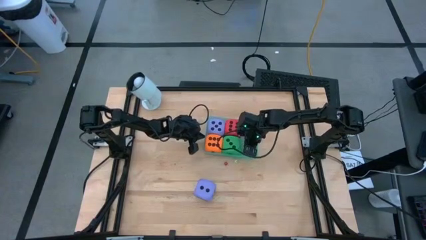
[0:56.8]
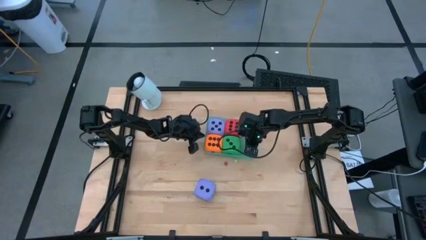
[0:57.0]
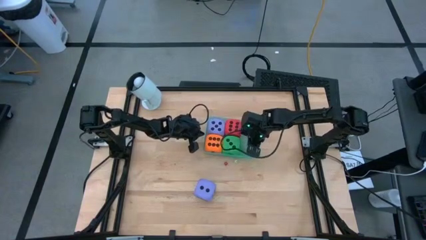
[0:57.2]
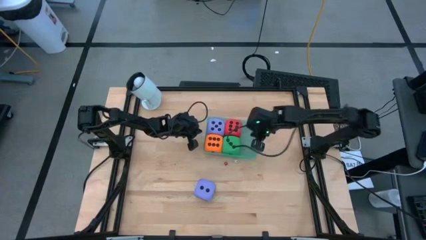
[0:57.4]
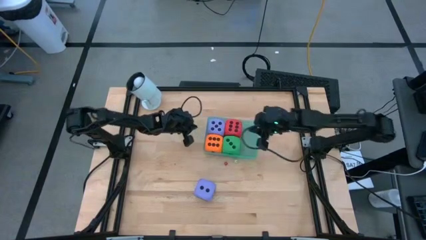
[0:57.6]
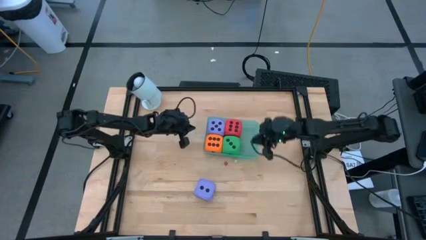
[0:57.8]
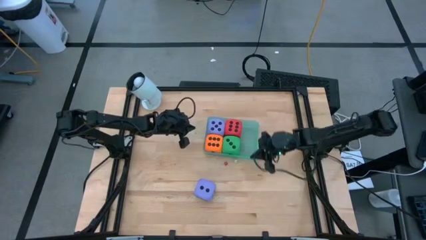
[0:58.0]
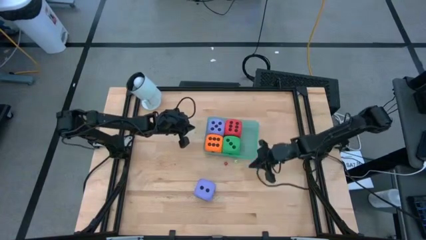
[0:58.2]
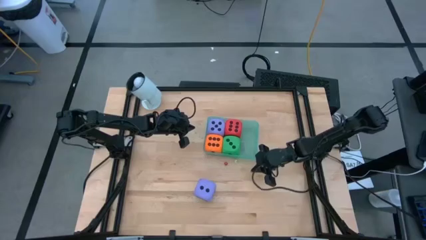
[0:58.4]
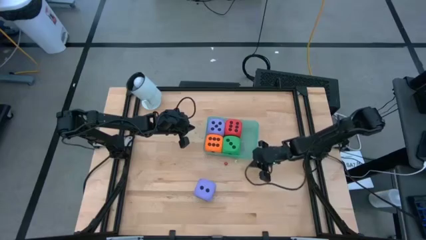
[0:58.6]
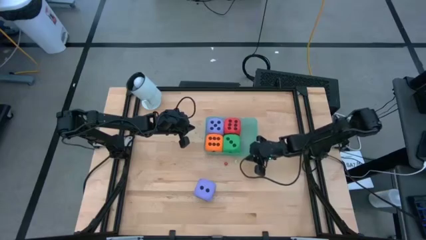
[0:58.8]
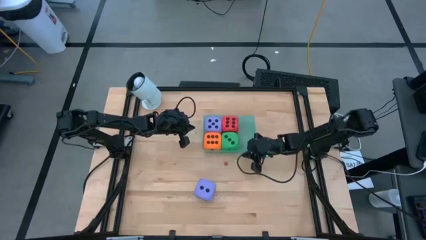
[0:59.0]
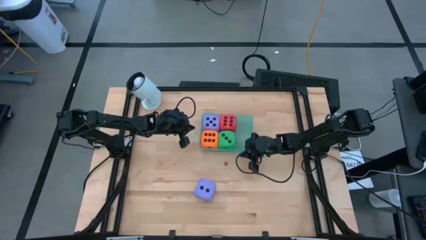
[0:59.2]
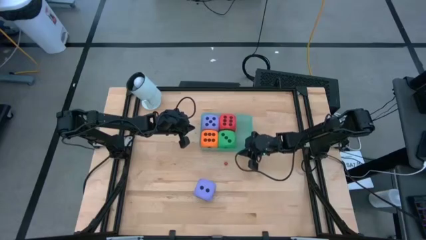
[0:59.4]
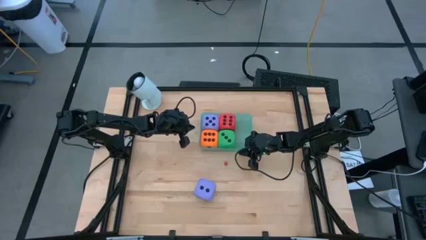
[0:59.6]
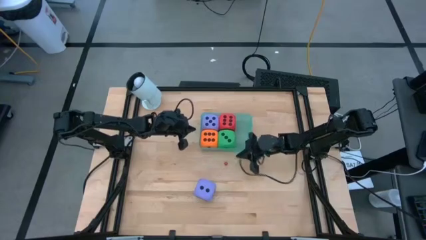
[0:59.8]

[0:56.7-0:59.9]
Task: Pick & Place Dice
Adjust the green bin

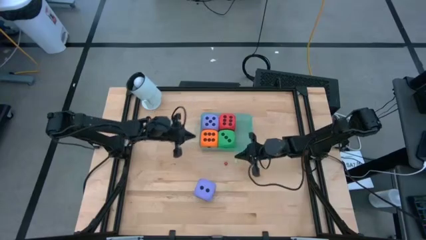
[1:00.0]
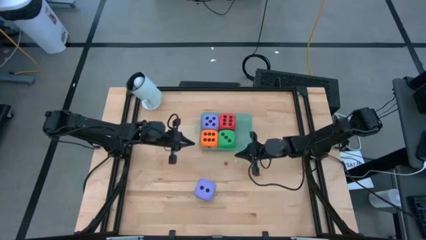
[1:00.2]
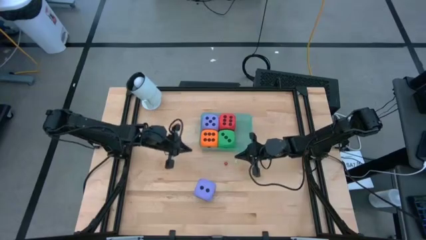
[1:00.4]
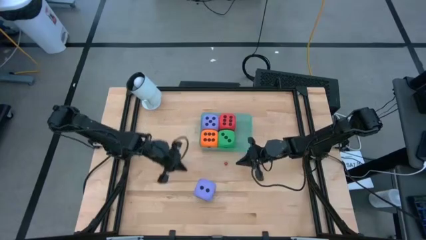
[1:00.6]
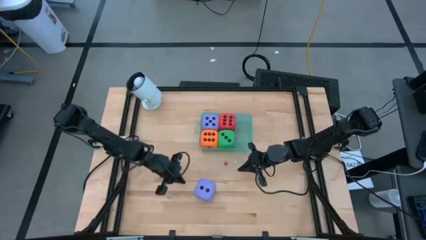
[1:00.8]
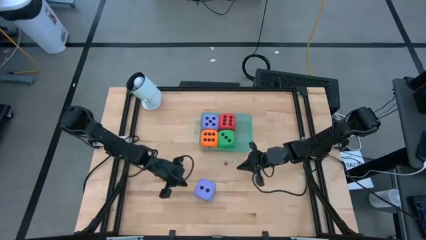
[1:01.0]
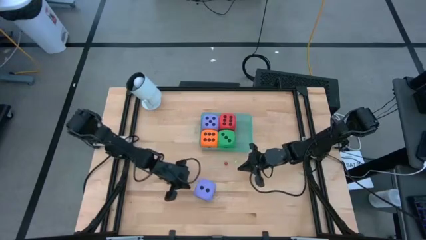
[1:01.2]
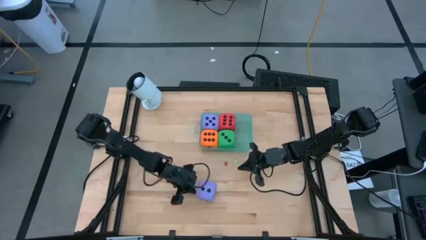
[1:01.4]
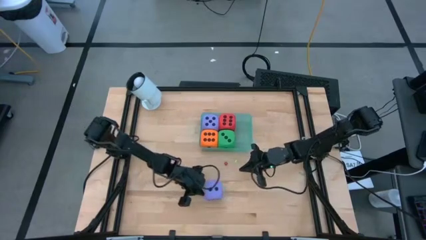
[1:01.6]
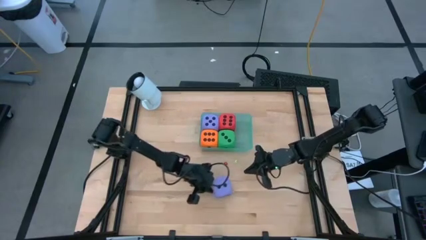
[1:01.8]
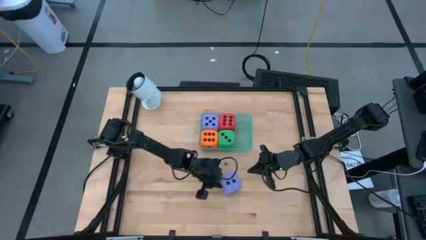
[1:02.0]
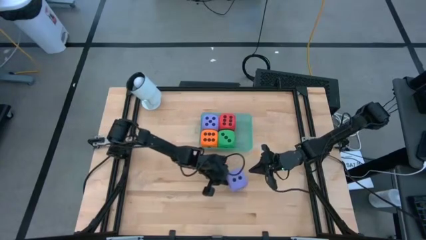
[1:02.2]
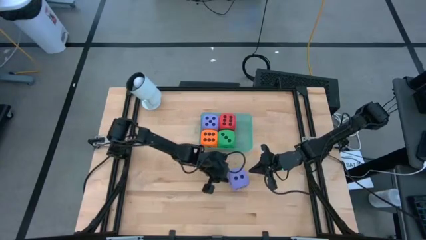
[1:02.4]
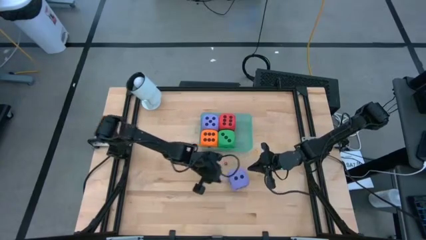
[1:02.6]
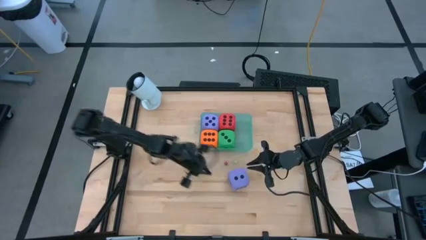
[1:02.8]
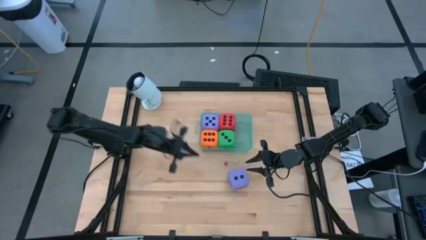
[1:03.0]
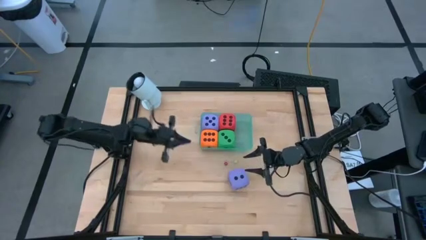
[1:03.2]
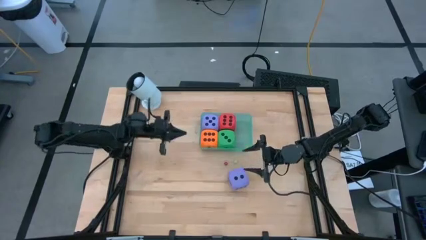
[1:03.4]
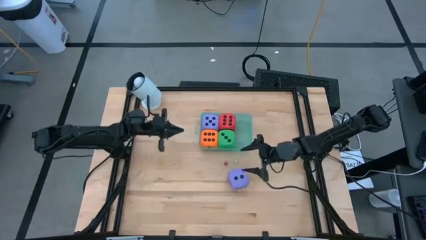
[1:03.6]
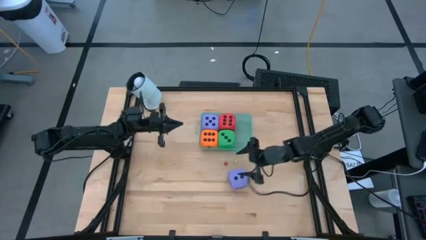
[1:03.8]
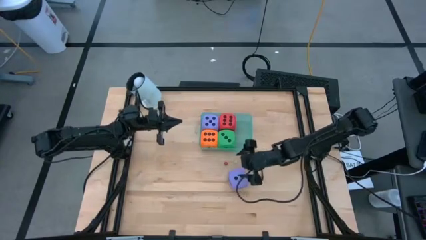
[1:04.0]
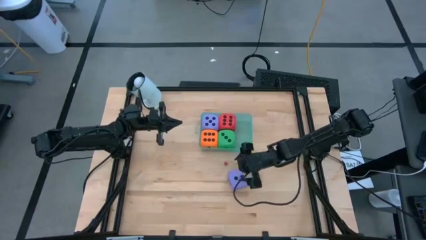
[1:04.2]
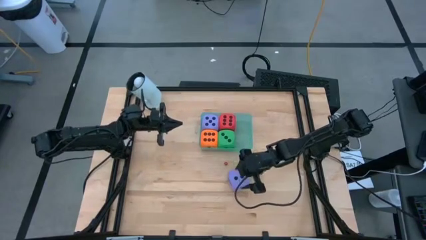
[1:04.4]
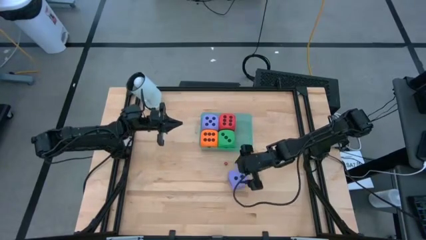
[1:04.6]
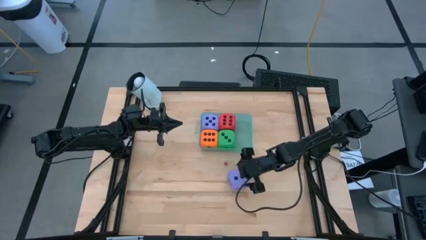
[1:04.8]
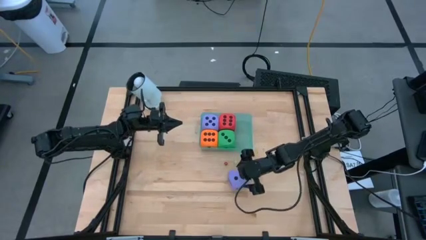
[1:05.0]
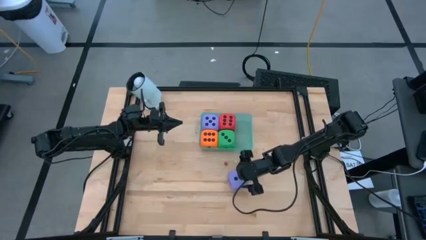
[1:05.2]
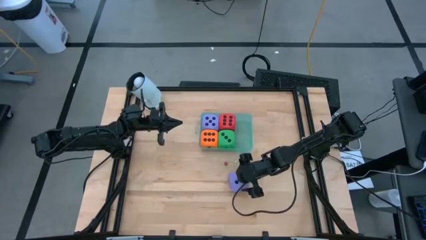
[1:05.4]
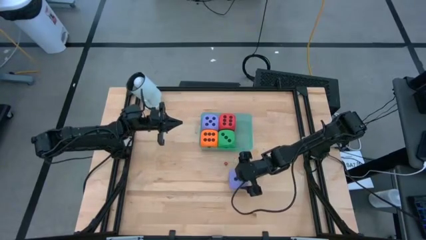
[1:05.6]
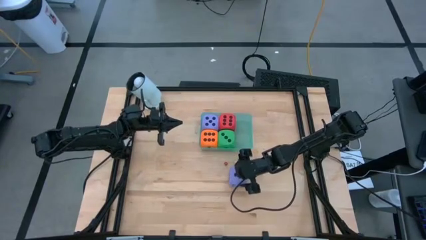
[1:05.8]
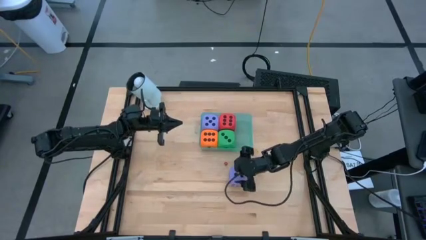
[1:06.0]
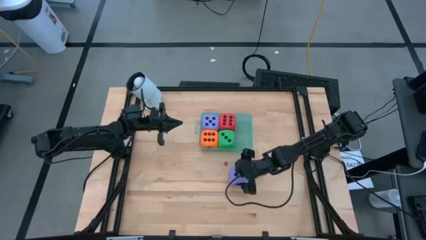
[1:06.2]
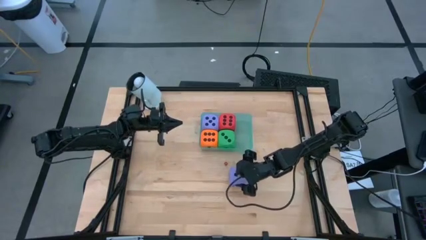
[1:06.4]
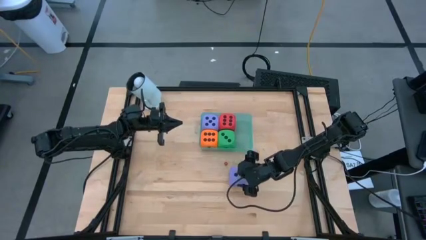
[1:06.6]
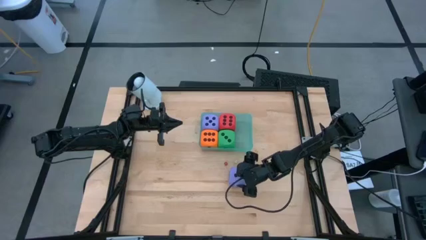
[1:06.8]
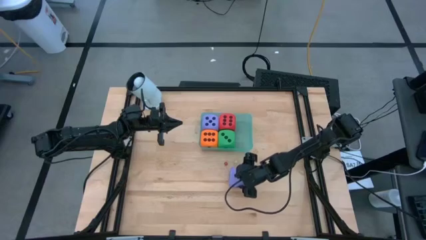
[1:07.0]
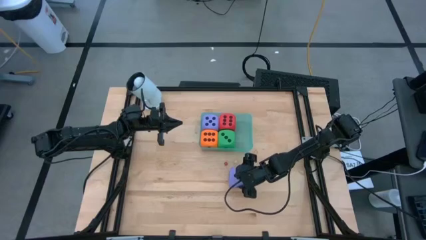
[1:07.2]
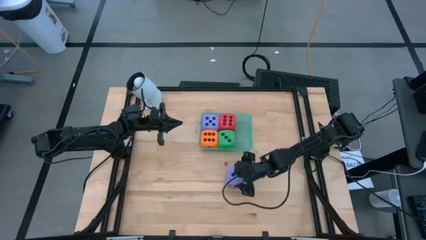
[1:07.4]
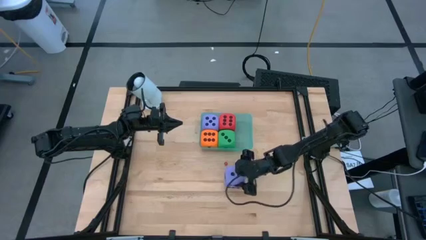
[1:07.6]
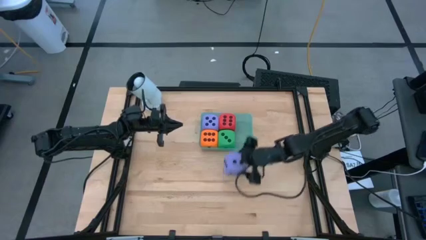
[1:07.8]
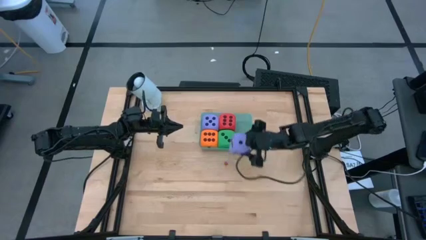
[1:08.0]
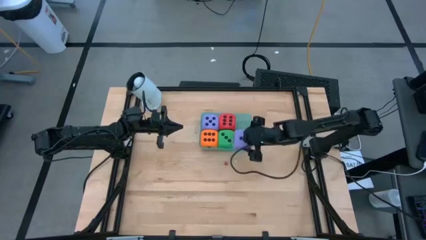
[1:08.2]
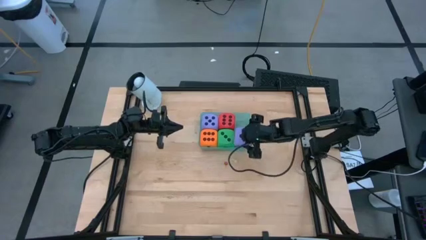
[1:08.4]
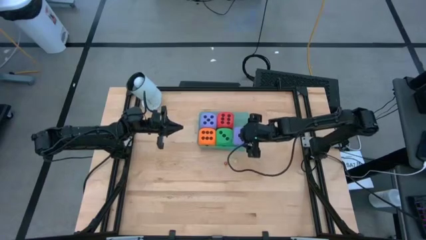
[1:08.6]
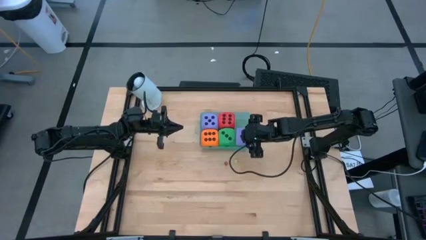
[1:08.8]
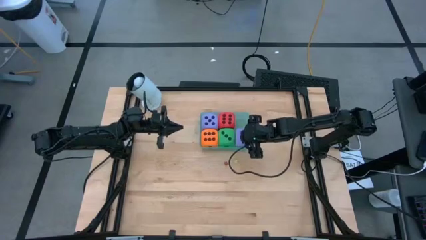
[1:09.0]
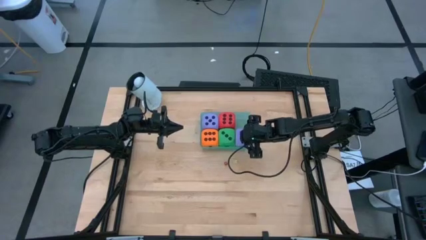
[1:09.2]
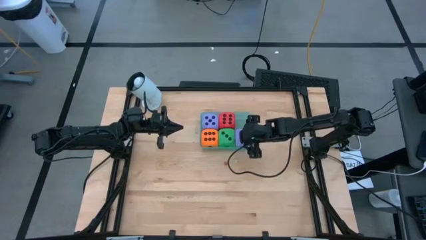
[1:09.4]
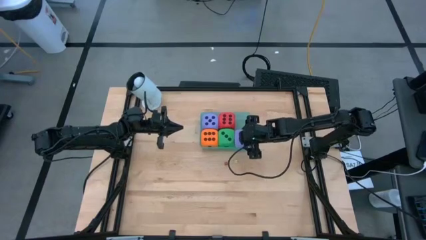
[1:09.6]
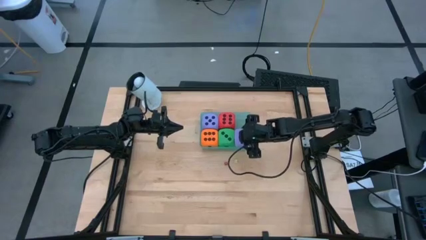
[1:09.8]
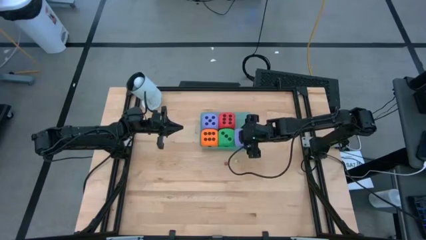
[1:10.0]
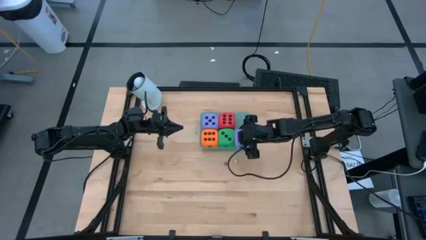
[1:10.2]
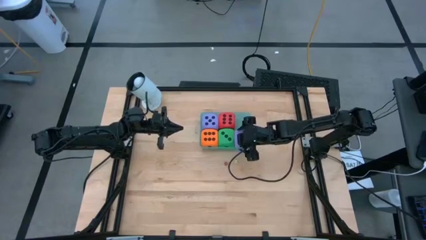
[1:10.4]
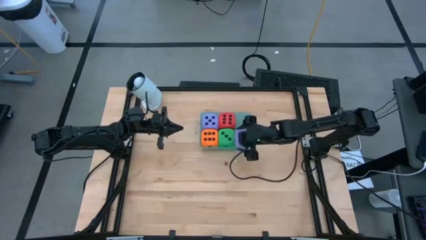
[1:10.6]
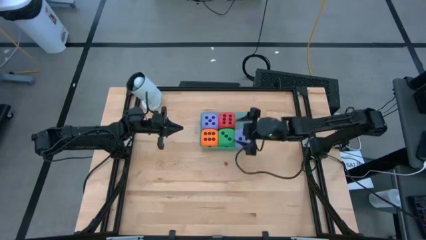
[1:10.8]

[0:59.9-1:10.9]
Put the big purple die into the green bin

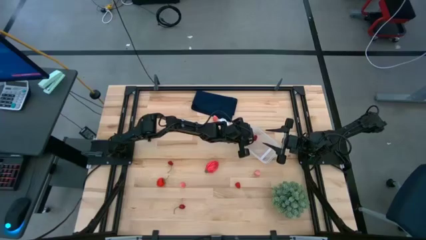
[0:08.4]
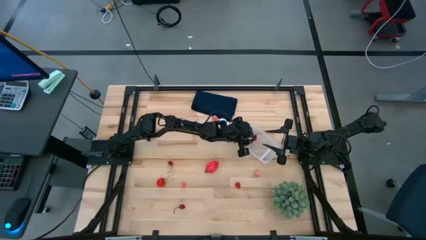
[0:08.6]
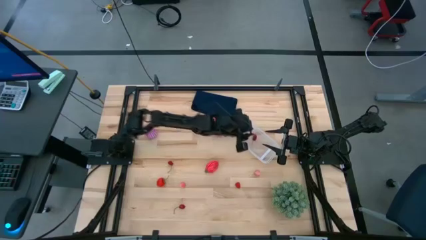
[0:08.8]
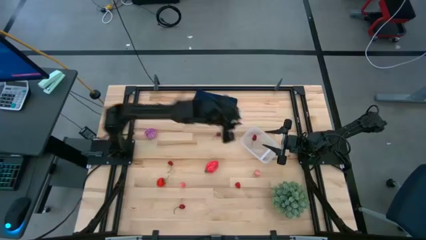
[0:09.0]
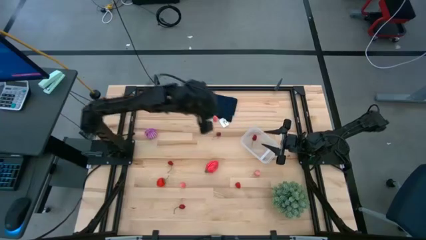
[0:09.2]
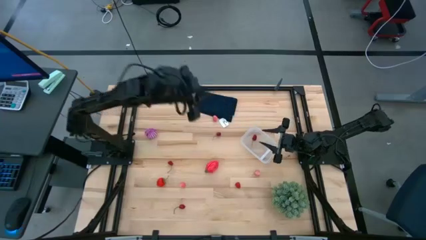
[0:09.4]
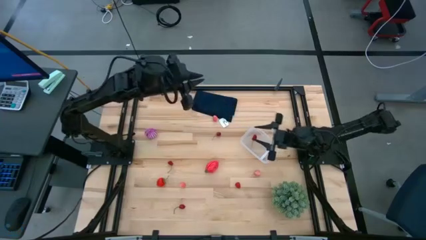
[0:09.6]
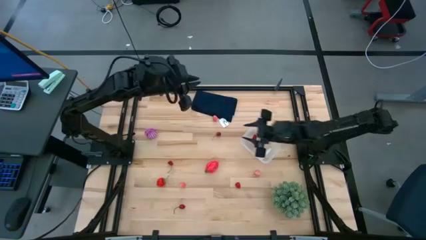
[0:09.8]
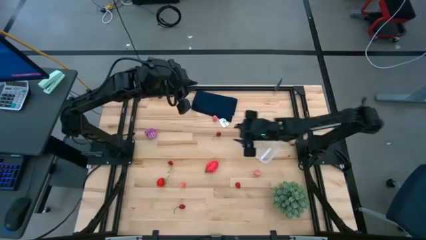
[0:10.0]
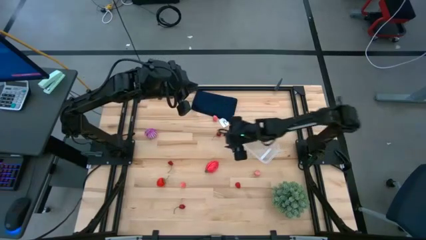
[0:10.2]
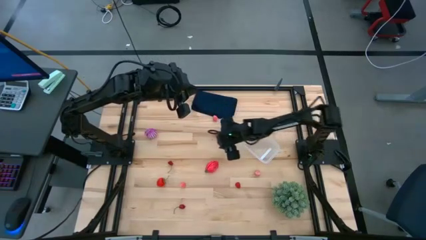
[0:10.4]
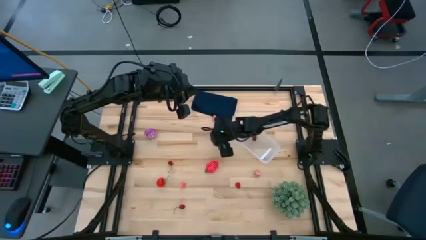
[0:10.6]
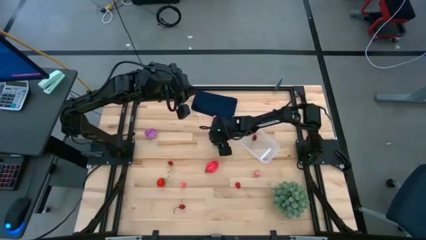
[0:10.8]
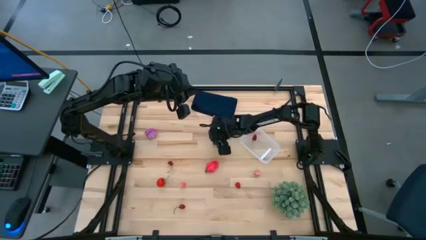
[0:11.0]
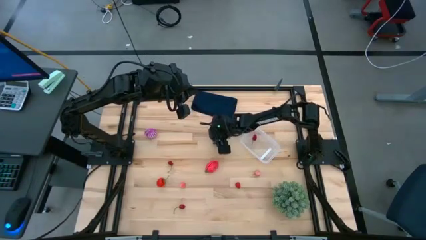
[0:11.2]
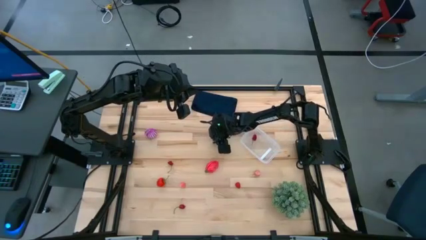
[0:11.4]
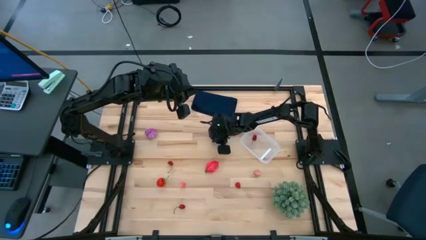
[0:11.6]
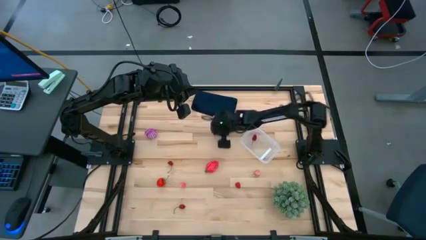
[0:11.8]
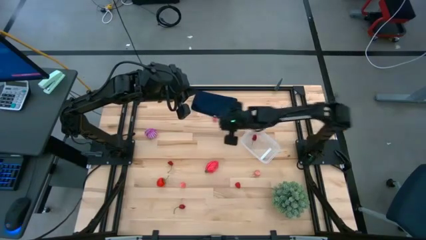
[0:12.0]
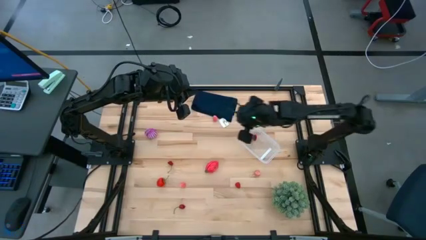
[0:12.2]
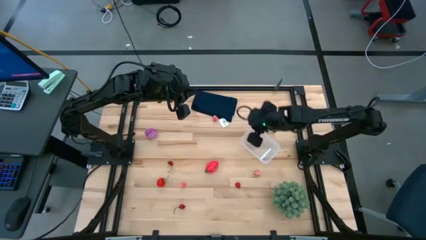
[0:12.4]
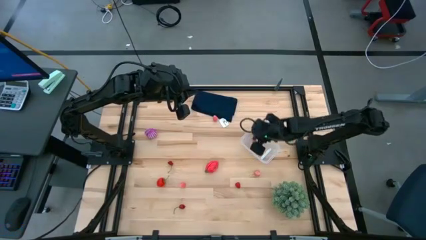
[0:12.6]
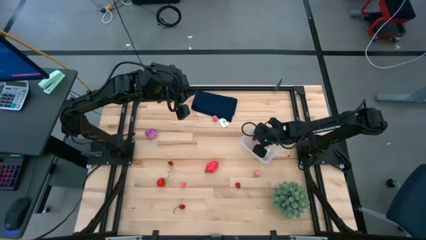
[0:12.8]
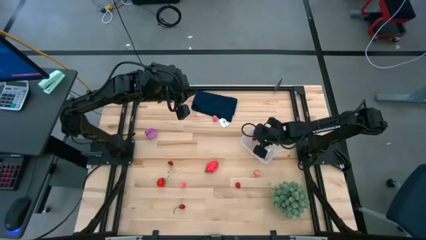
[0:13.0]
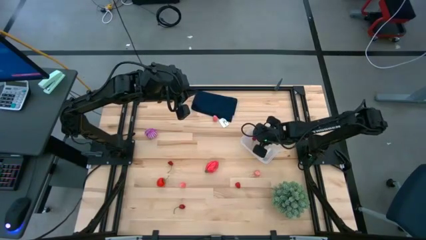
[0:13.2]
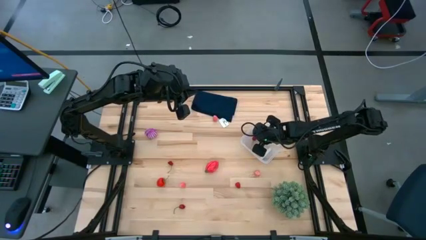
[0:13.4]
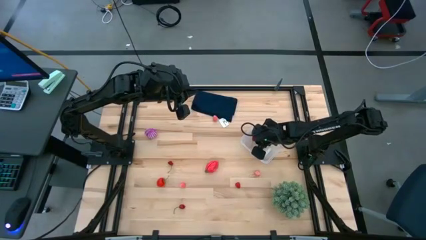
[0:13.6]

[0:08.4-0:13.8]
Task: Pick and placing Produce into tupperware
Put the cherry into the transparent bin
